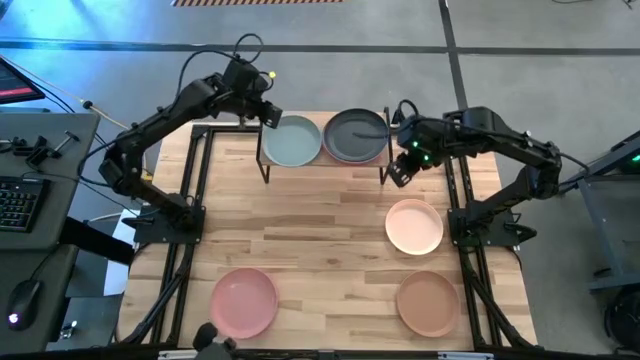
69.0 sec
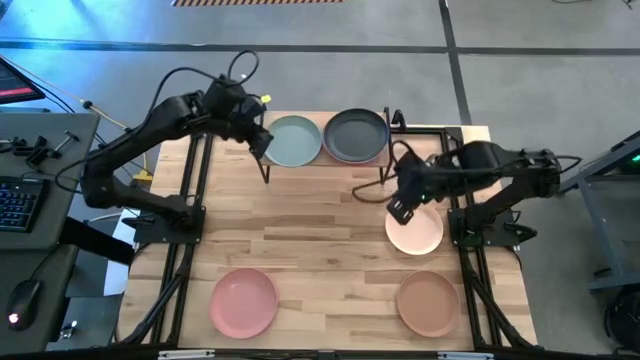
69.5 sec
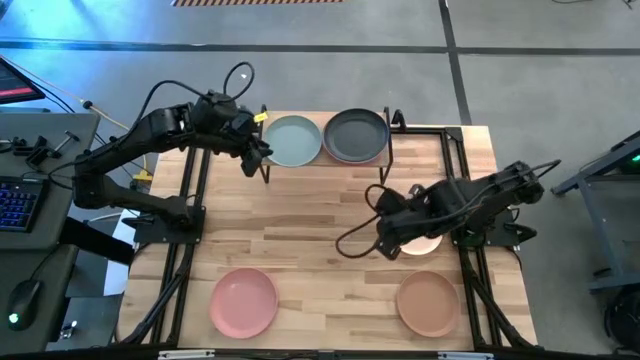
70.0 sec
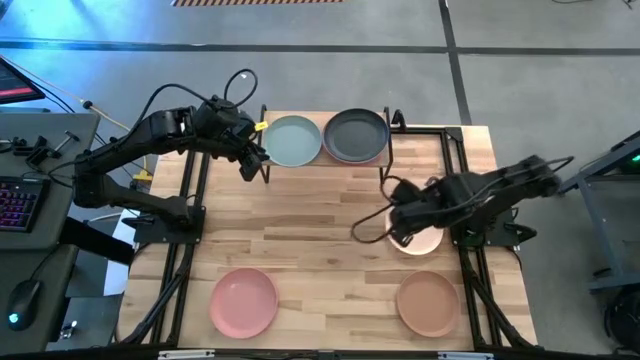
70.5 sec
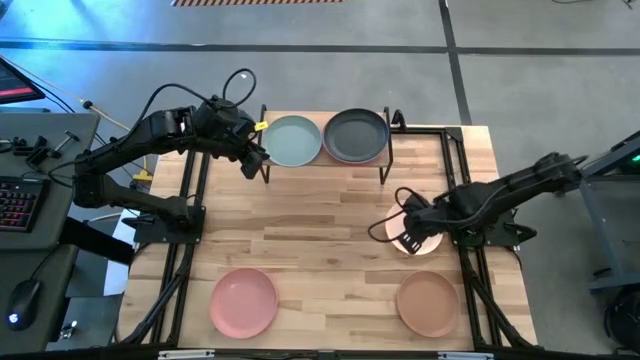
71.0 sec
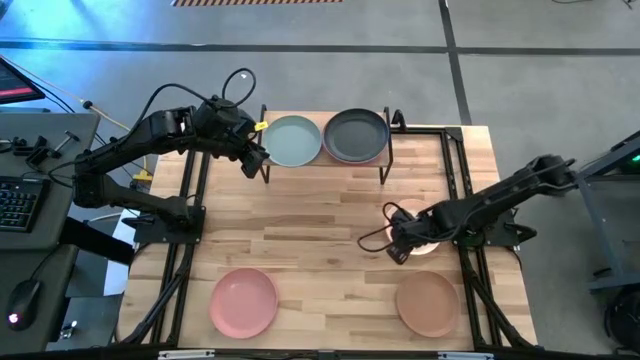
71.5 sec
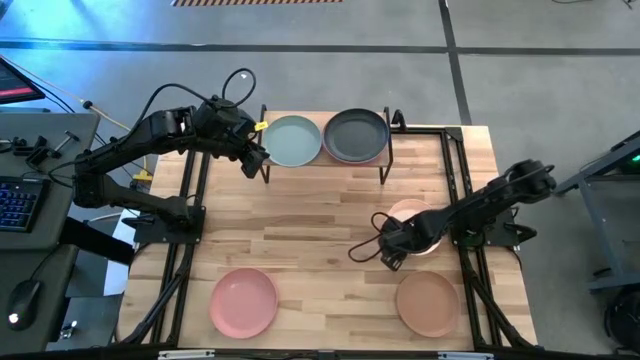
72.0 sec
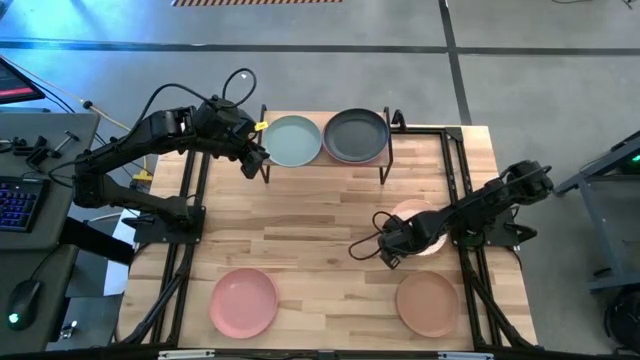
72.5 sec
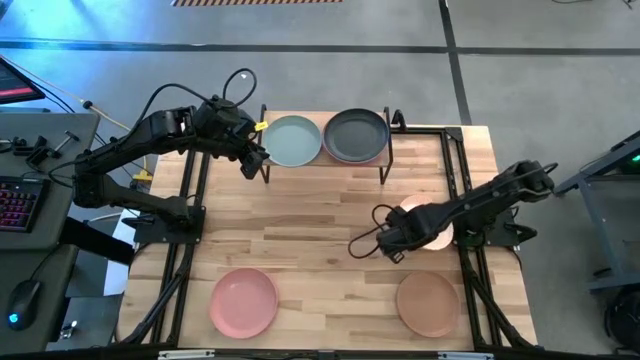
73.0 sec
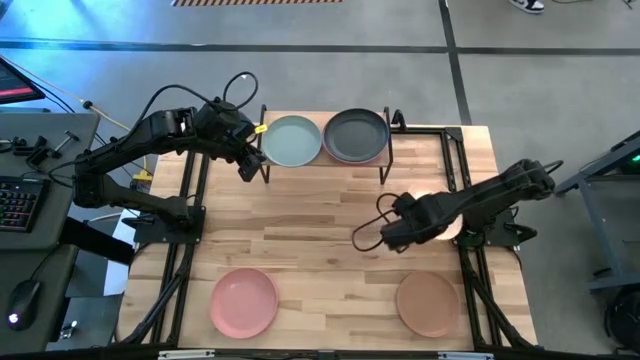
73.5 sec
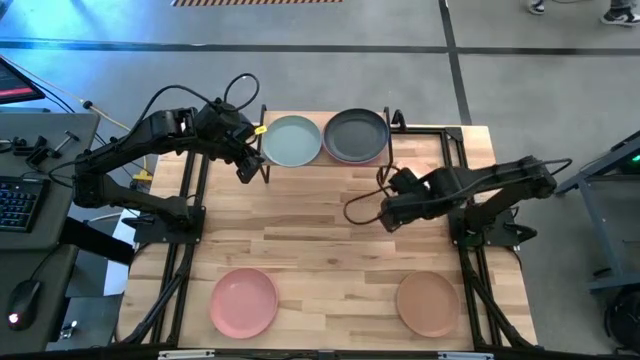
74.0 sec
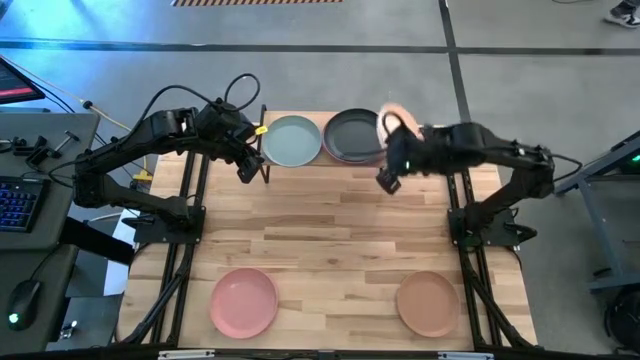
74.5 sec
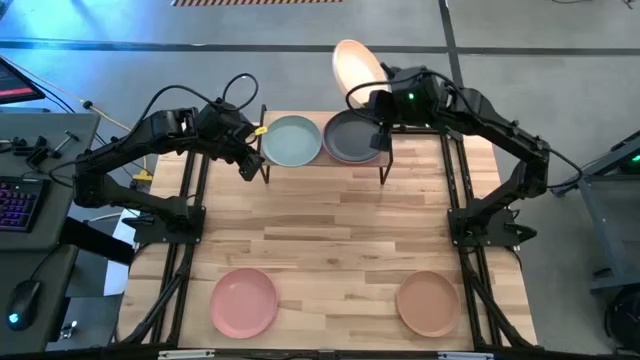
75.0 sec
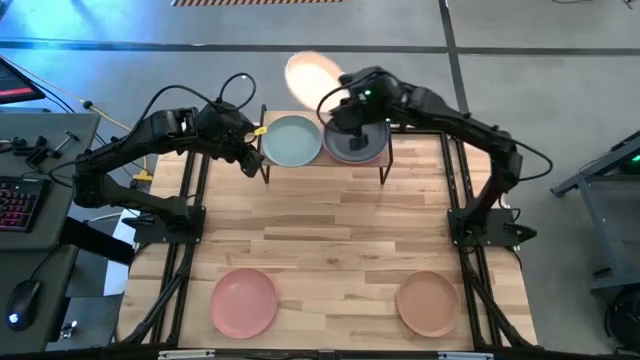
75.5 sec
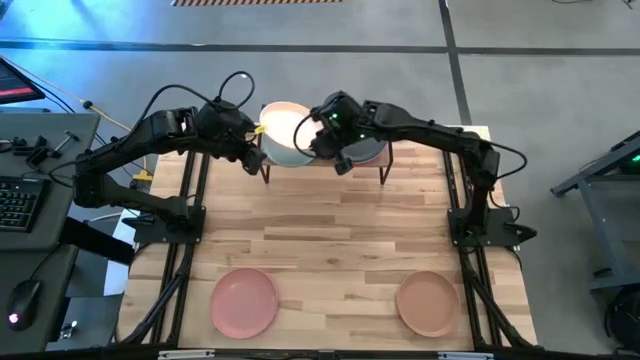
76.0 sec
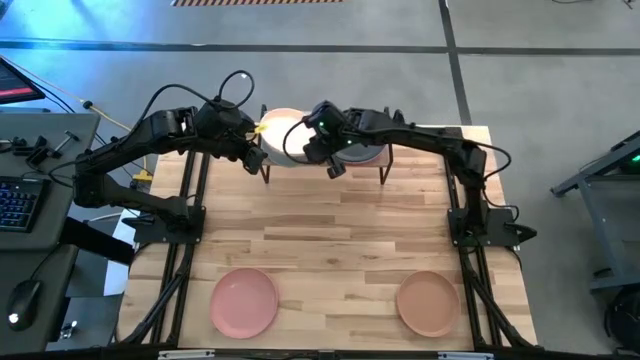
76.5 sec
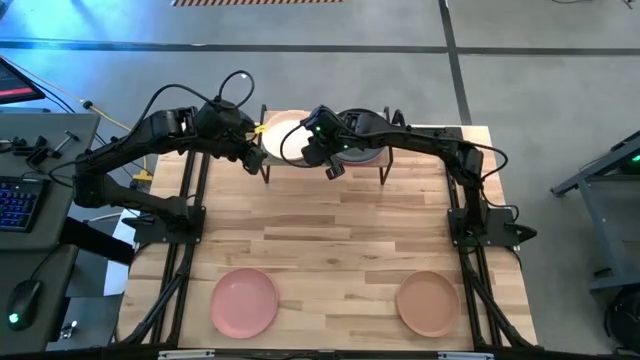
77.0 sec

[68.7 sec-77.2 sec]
Task: Place and stack plates onto a shelf
Stack the light orange plate on top of the gray plate on the shelf

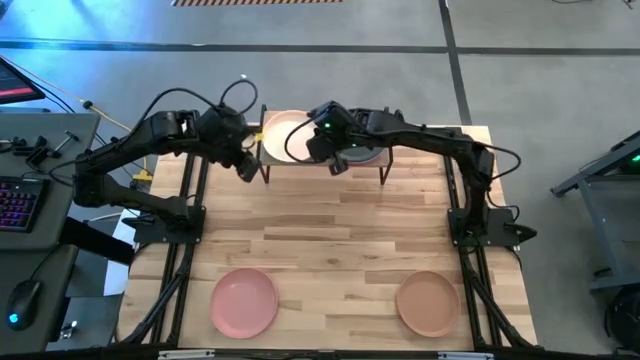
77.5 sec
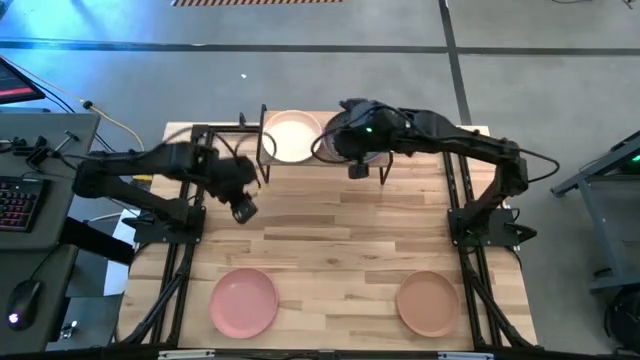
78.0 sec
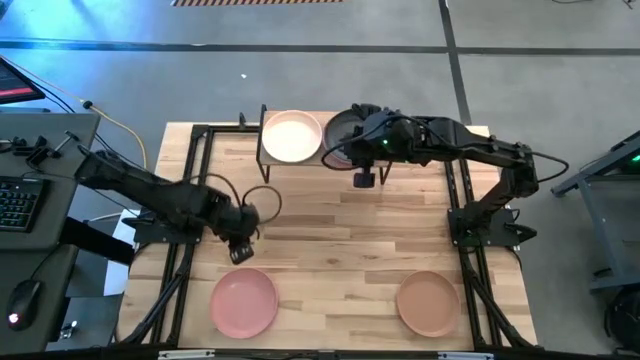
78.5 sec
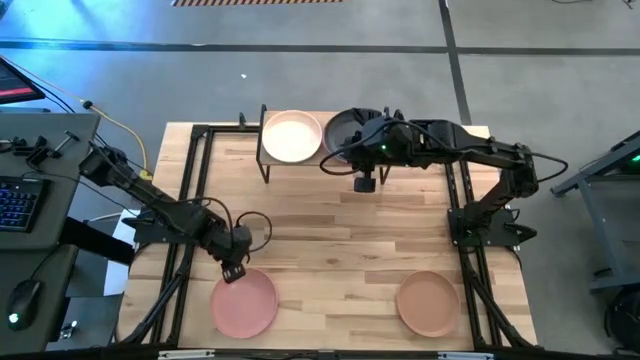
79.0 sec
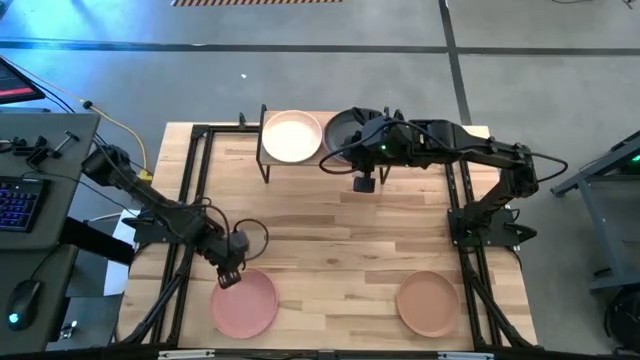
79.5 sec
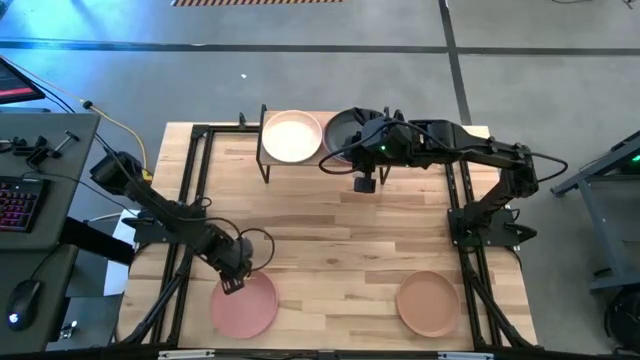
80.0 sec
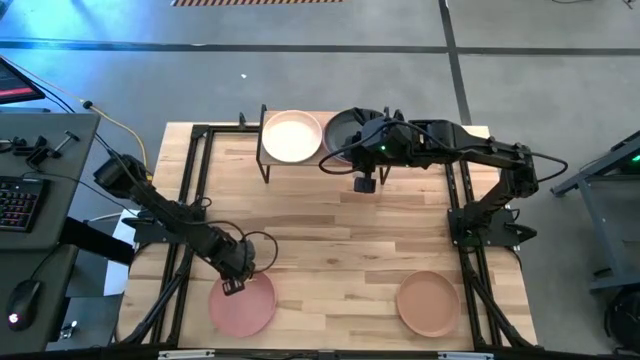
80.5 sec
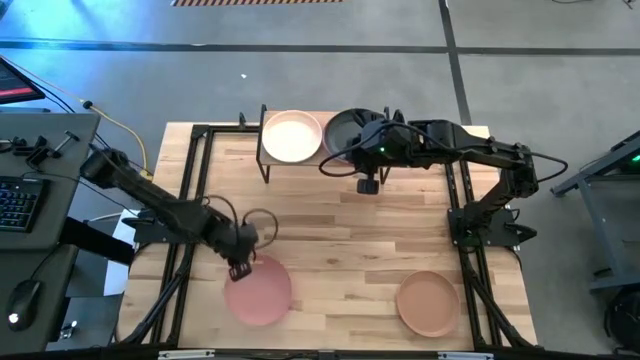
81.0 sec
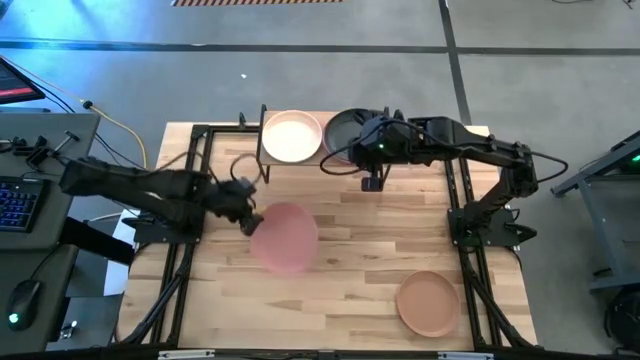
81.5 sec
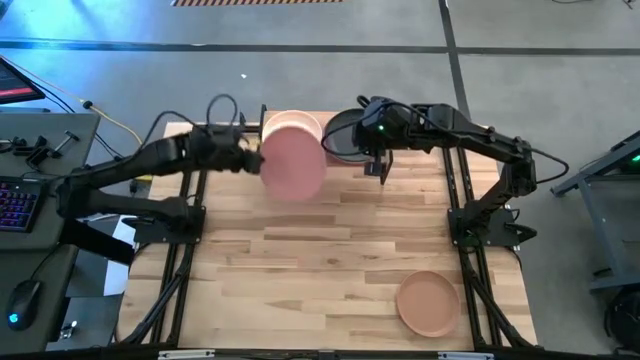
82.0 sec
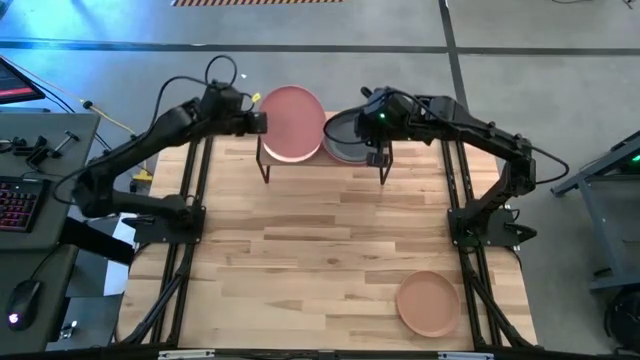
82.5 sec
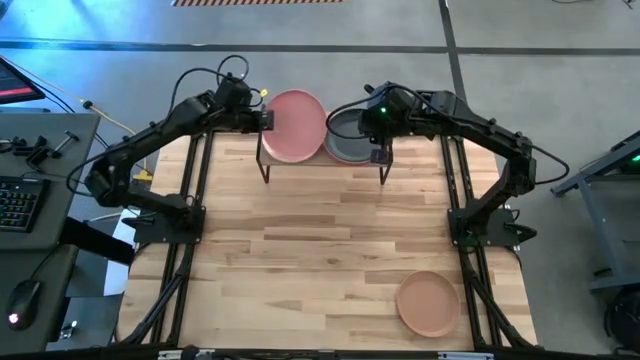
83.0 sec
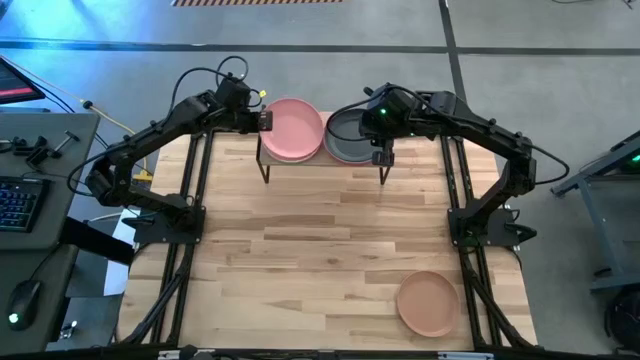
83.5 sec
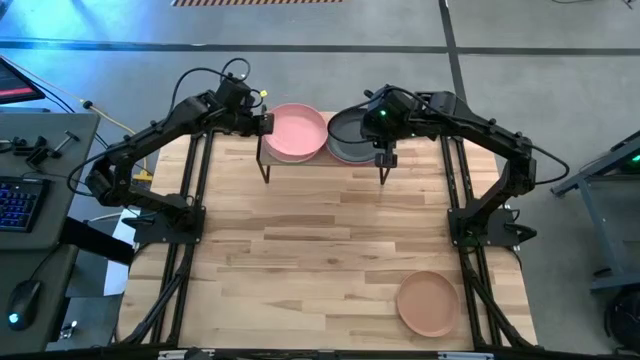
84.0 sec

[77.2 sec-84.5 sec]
Stack the pink plate on top of the light orange plate on the shelf

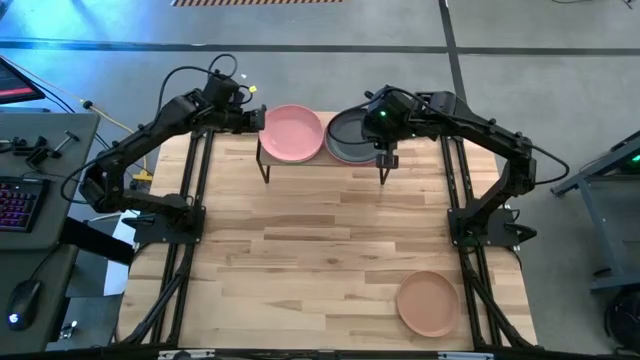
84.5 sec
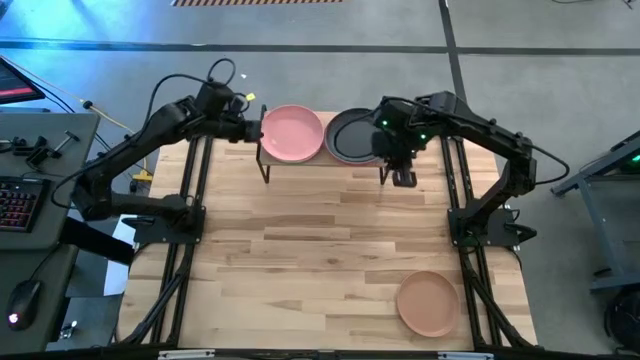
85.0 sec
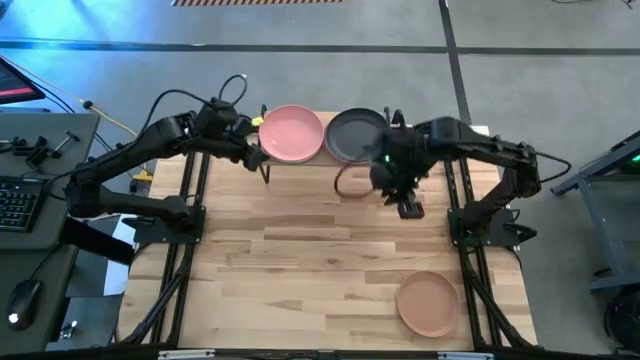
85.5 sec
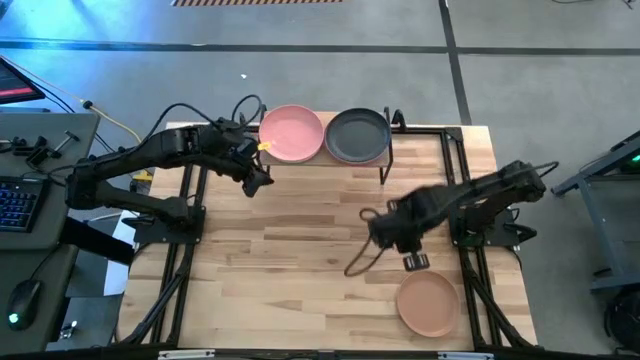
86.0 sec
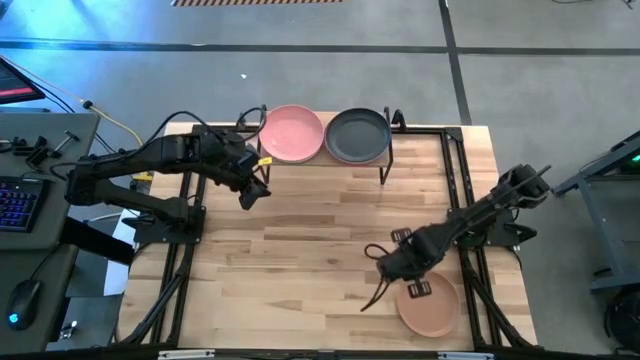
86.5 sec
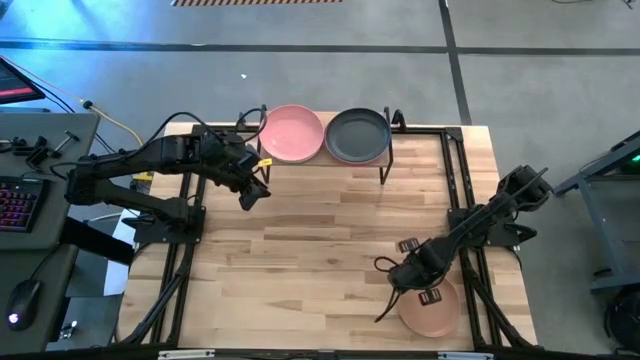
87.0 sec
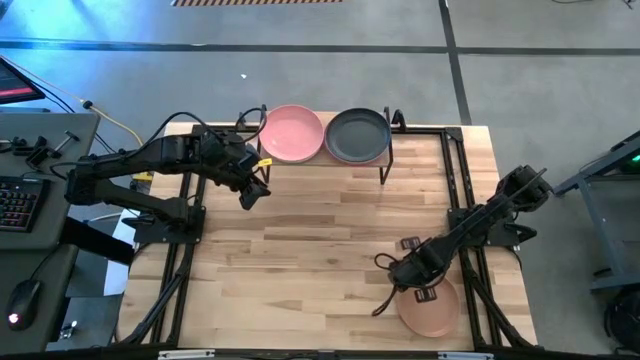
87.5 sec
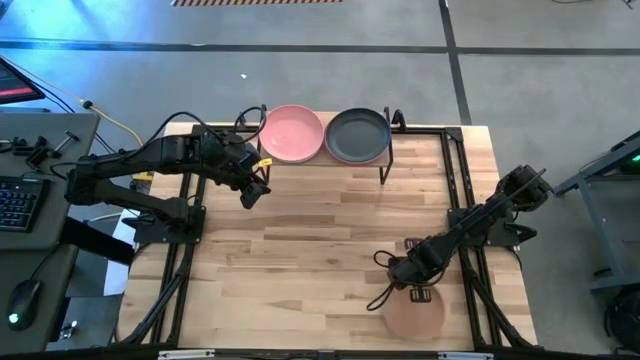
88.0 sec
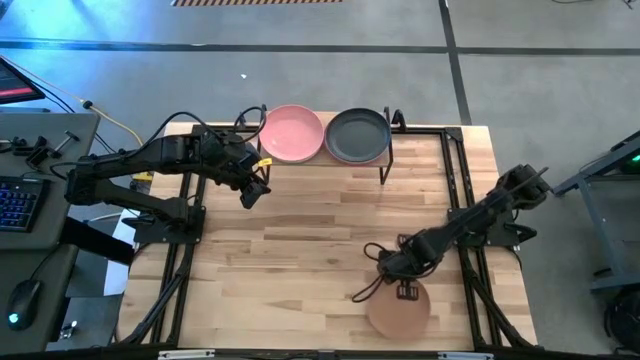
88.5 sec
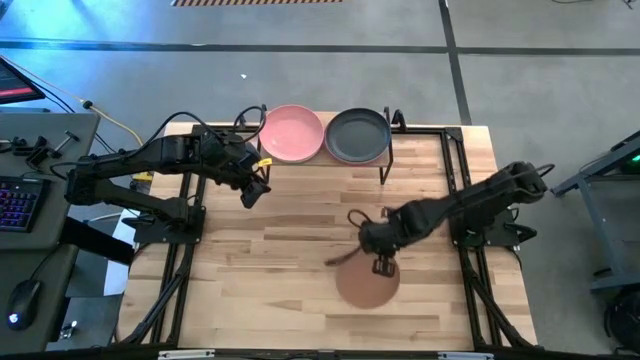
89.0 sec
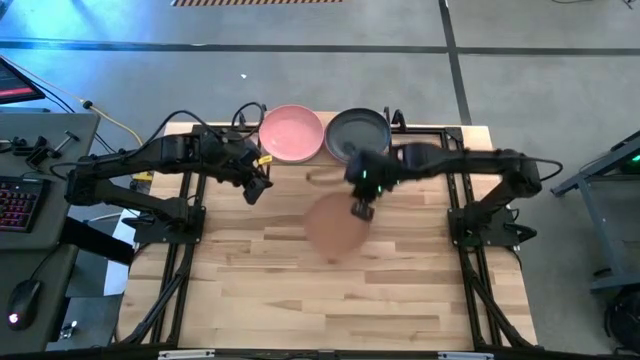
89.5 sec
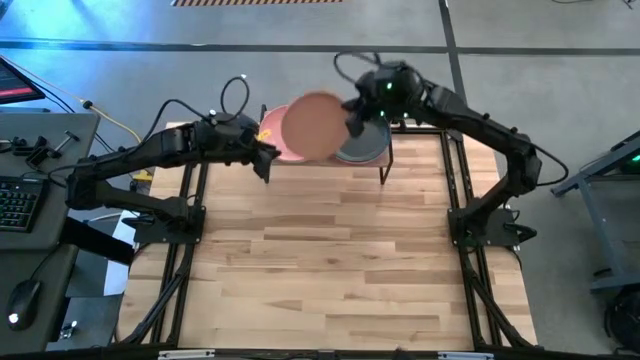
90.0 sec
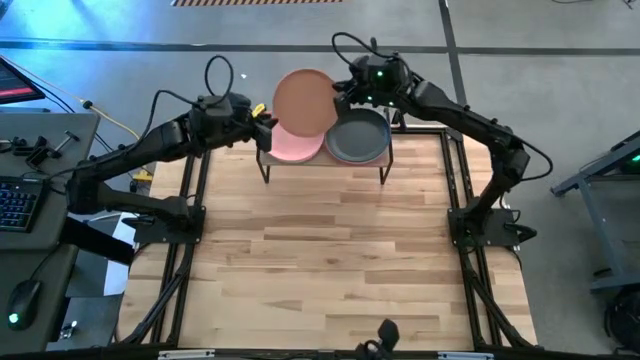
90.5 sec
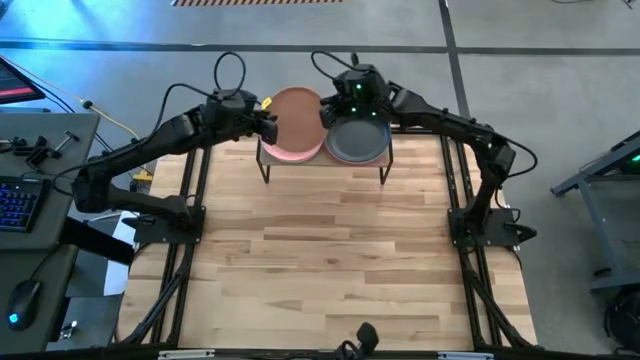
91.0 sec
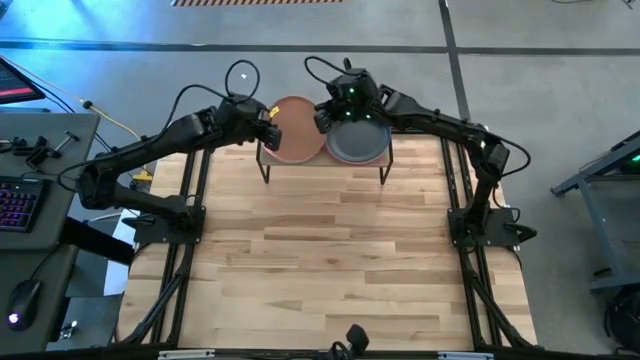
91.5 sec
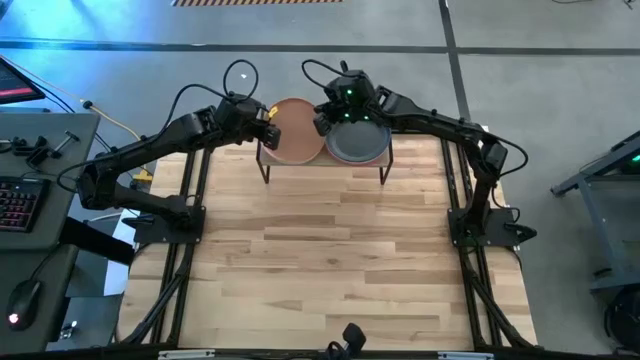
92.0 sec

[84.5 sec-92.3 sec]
Stack the brown plate on top of the pink plate on the shelf
